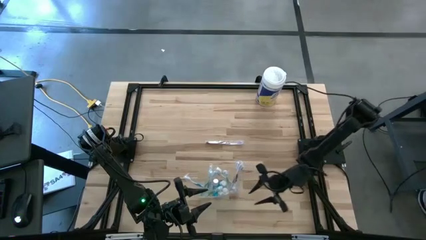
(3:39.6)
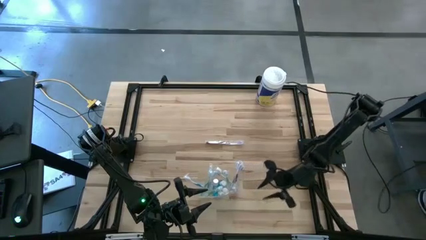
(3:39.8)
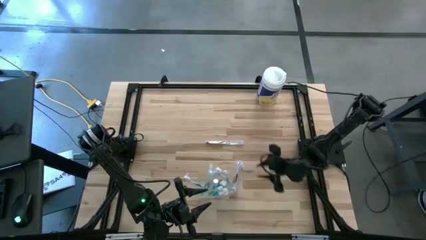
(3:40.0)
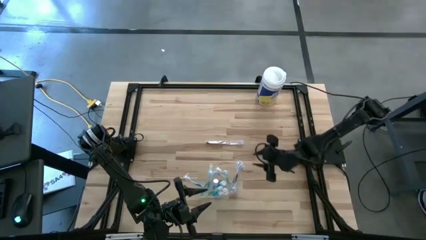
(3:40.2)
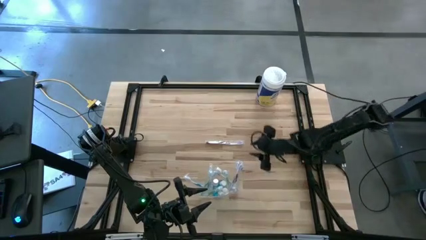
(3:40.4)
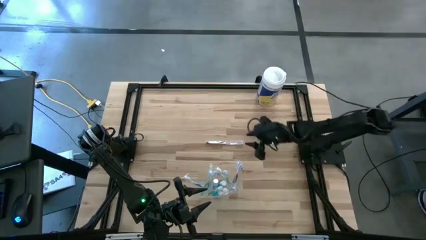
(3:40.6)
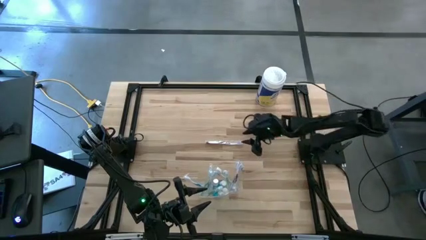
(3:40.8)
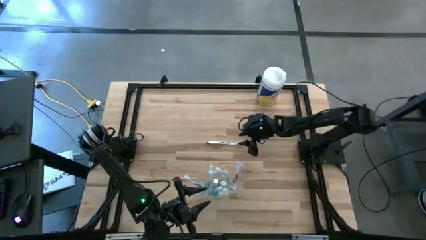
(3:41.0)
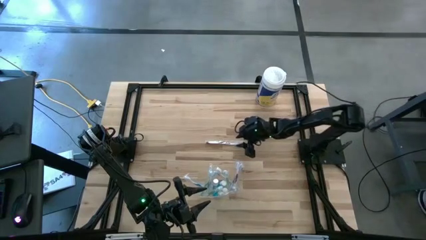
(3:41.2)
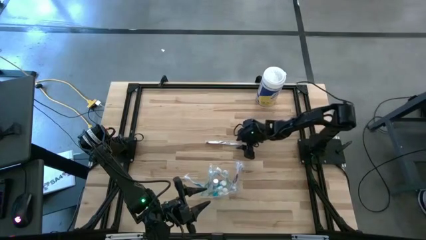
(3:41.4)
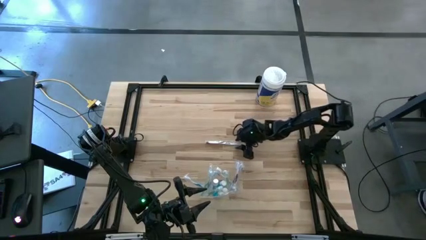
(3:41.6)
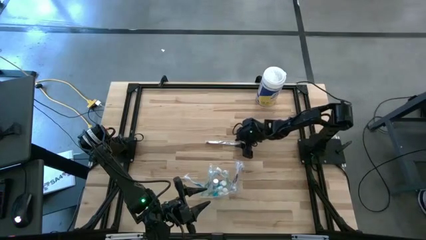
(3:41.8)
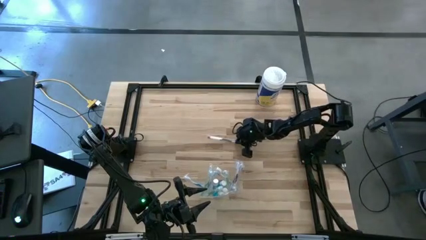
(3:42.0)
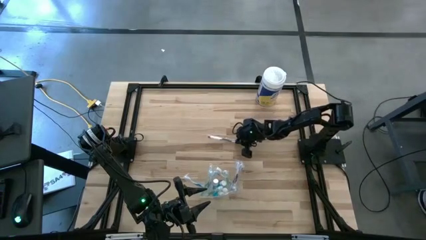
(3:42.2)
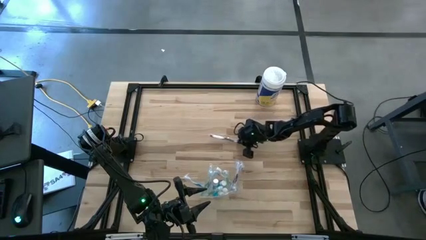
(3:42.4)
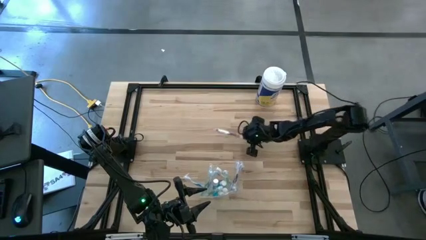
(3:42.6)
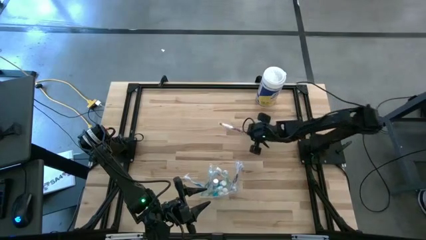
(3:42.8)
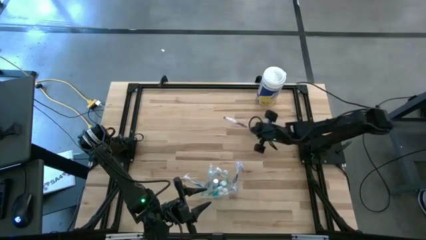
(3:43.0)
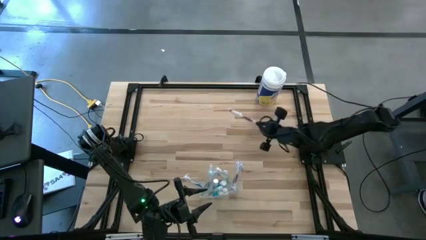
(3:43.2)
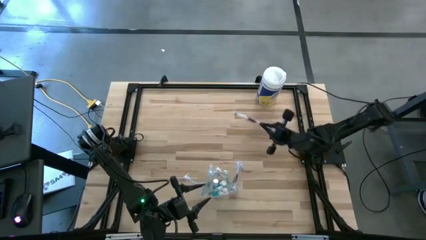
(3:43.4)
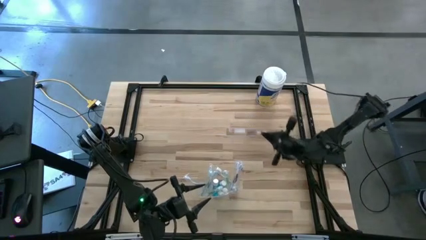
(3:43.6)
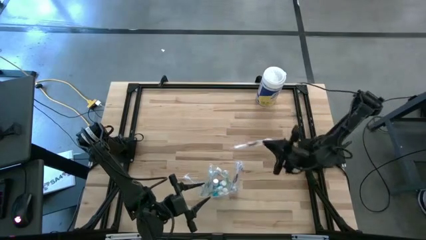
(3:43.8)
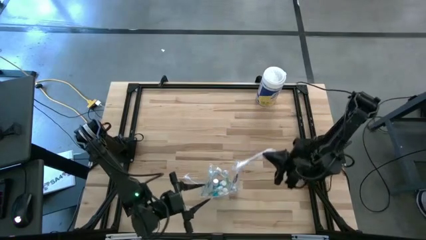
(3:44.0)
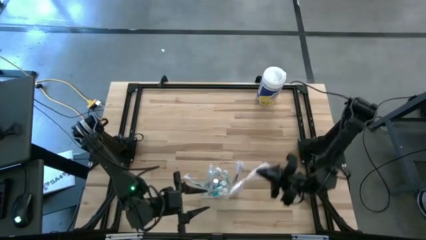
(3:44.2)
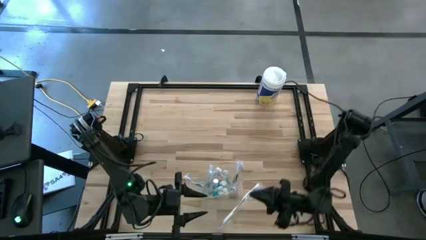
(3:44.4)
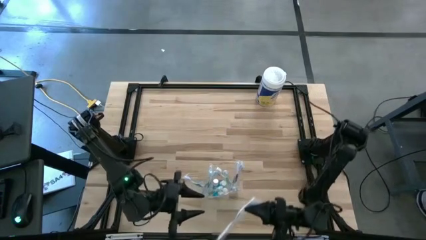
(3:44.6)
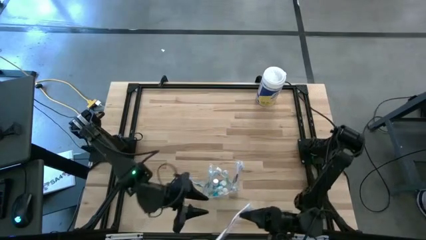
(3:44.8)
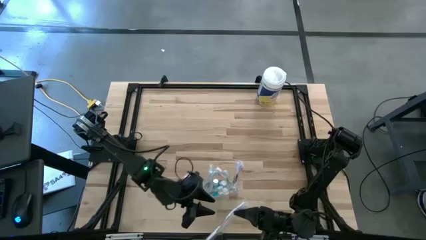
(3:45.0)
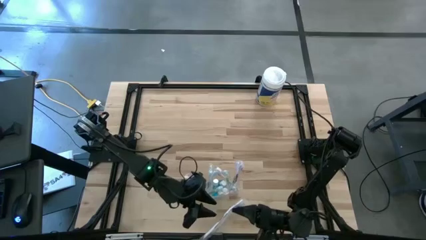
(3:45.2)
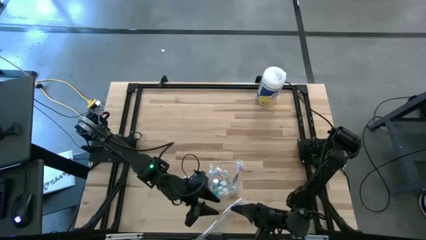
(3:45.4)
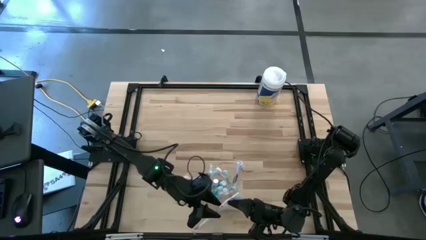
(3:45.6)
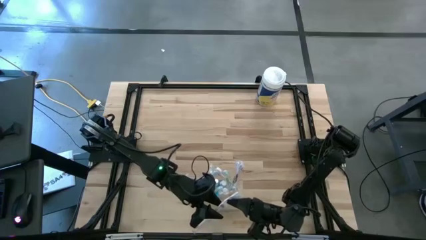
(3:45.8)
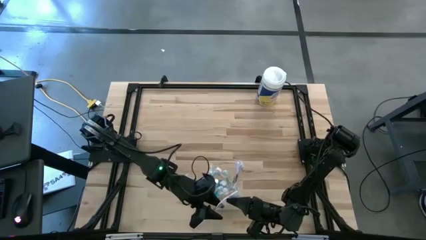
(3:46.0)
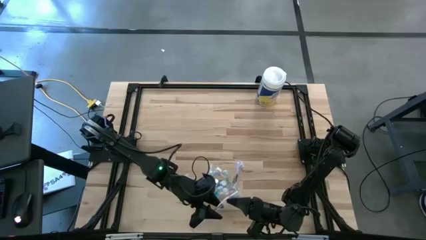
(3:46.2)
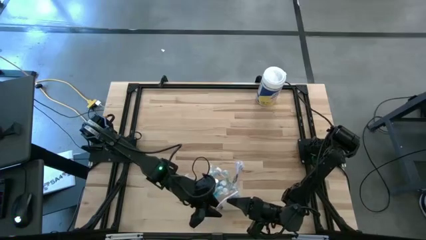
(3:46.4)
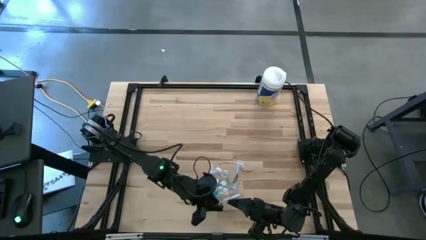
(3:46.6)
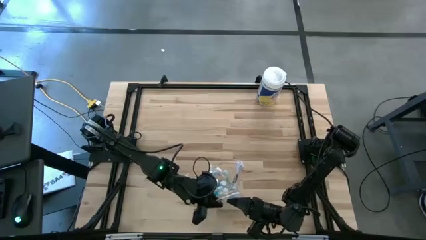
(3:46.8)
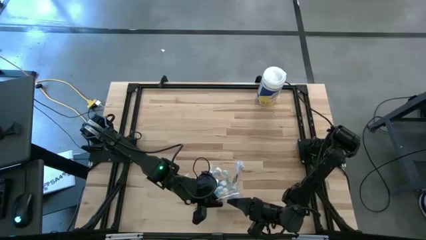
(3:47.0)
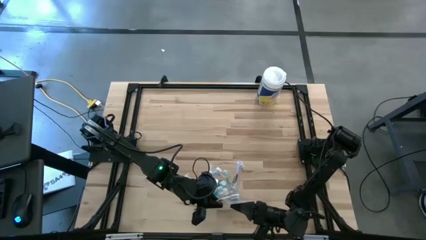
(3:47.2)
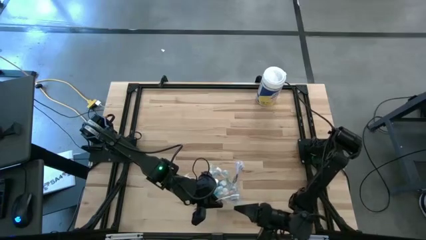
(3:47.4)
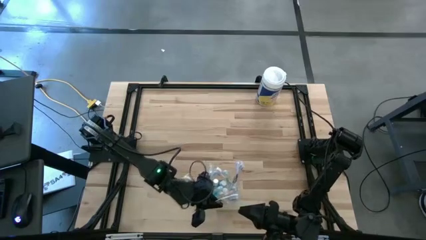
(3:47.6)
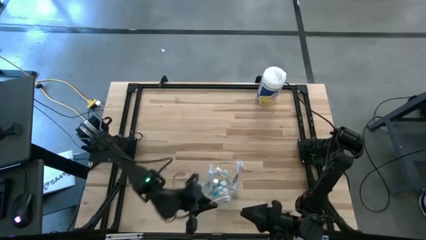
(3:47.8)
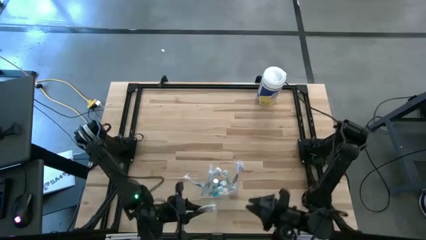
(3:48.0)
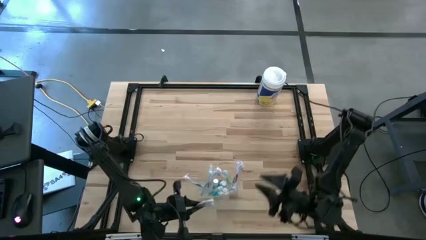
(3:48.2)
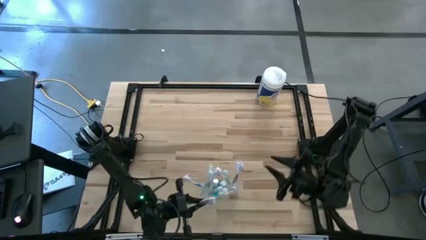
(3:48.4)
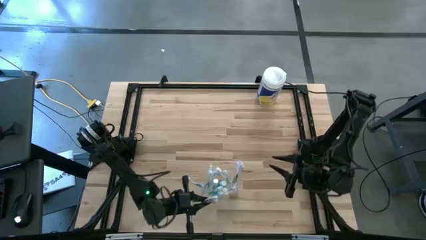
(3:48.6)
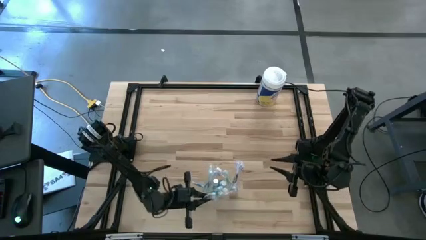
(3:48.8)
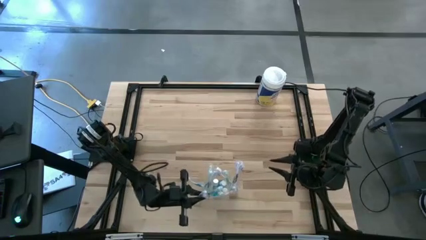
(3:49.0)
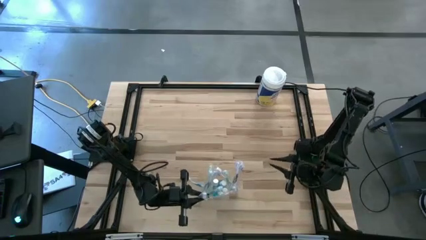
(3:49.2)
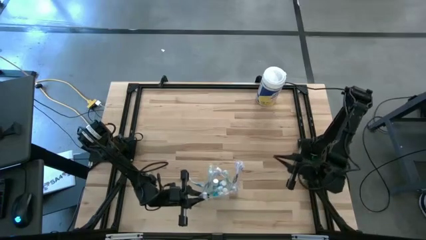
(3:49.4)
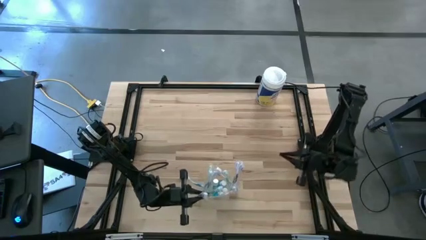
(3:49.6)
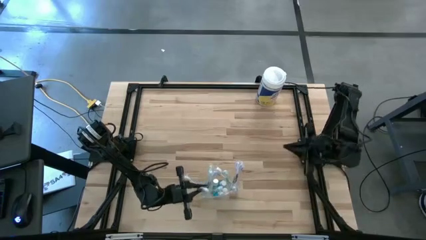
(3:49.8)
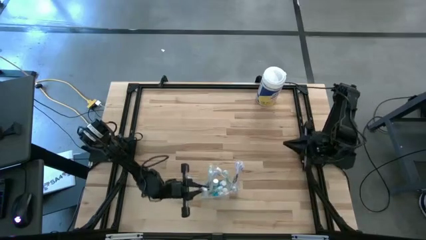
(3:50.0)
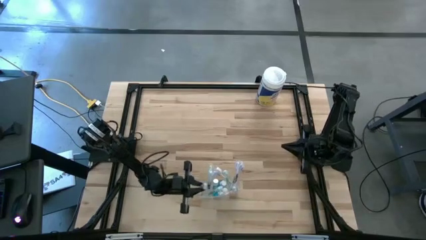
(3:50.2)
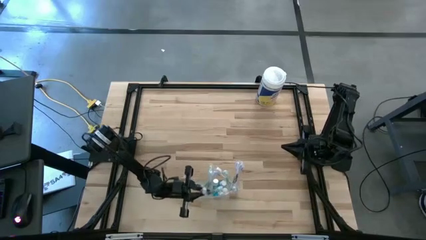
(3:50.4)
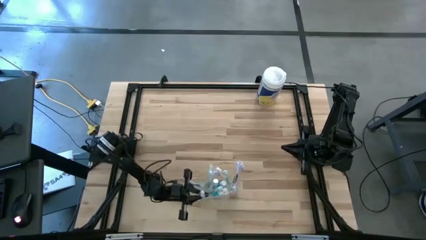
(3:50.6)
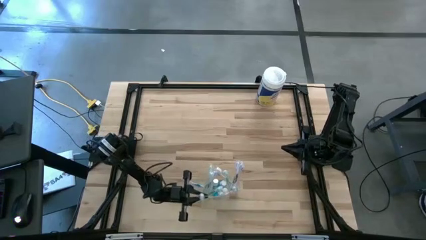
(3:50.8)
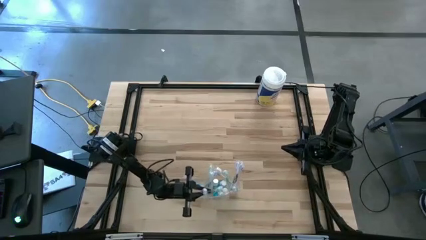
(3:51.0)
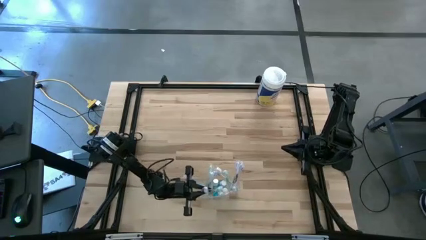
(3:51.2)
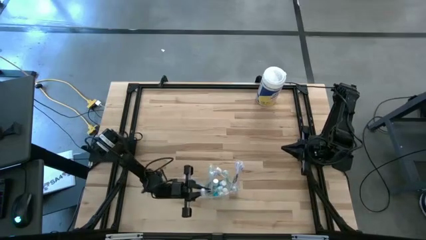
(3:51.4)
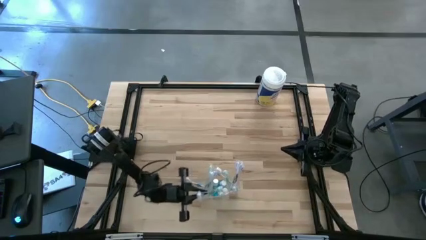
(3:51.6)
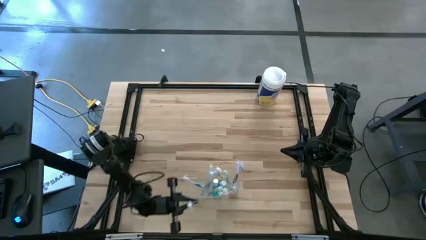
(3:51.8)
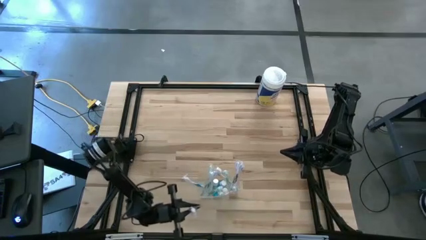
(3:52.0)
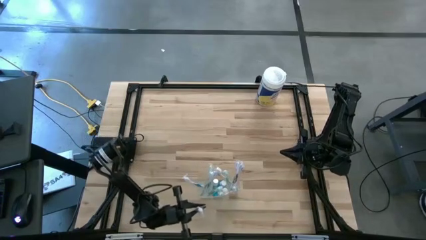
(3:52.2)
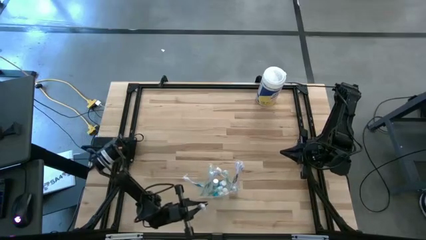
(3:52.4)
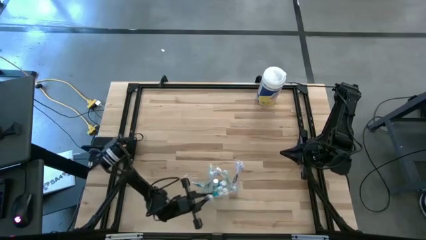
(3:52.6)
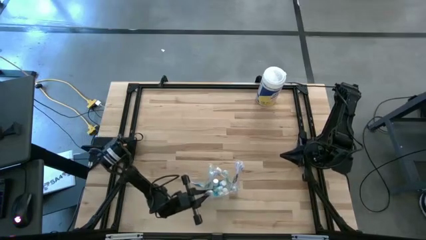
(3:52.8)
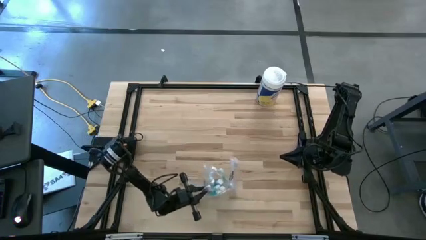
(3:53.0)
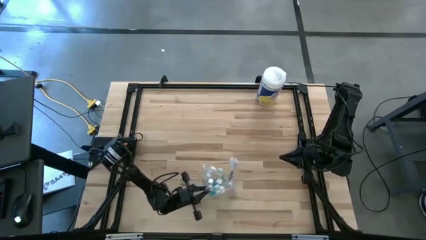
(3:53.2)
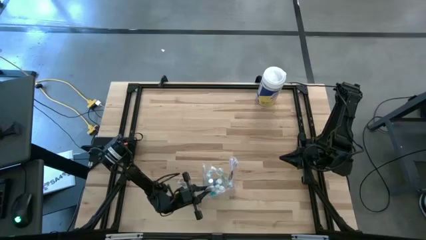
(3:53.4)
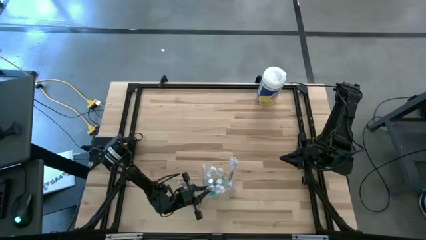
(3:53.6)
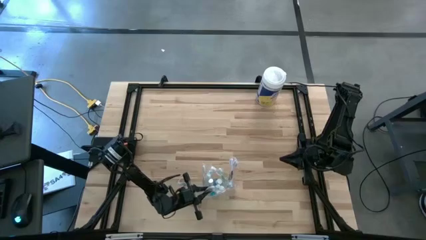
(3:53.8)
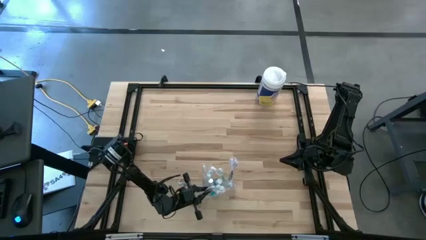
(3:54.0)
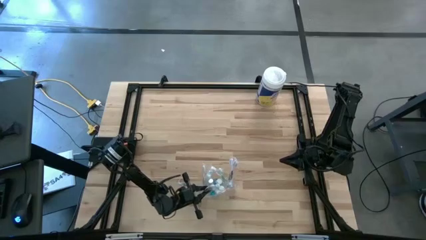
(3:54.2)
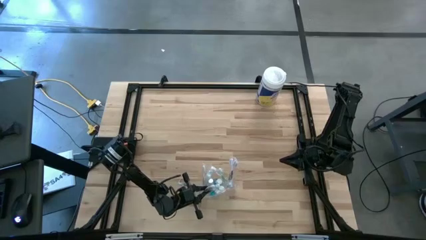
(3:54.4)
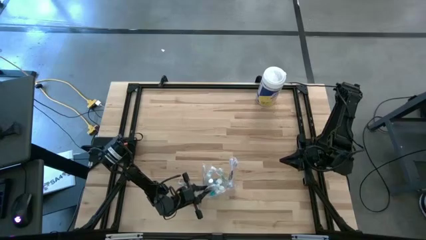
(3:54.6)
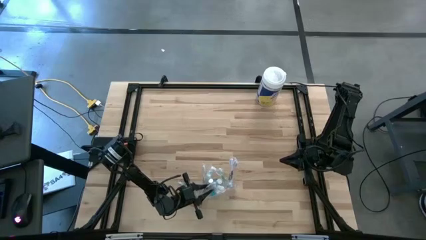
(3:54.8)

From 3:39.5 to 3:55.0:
Task: Pick & Place toothbrushing station
Put the purple toothbrush into the transparent organizer

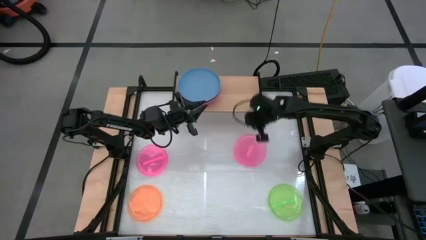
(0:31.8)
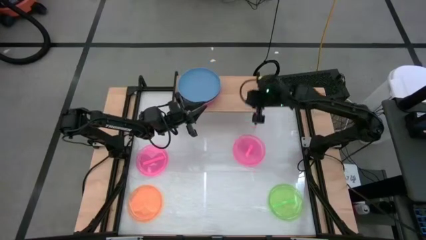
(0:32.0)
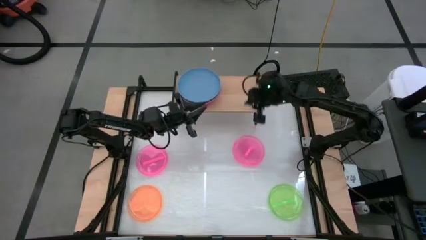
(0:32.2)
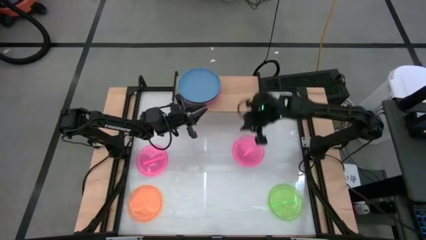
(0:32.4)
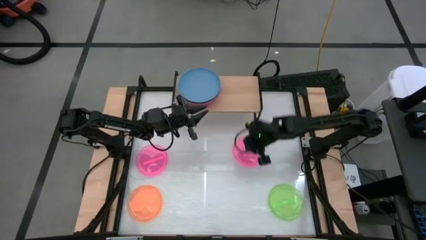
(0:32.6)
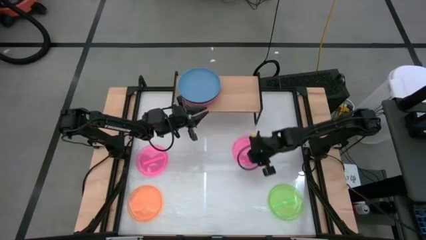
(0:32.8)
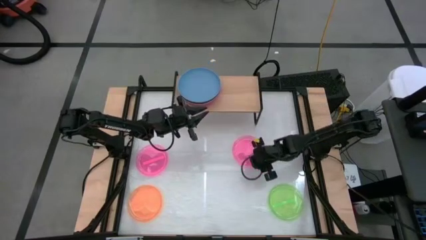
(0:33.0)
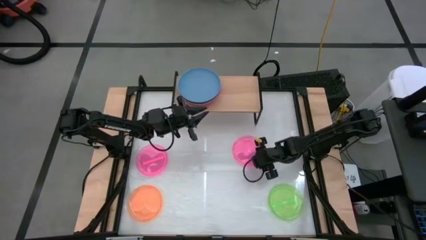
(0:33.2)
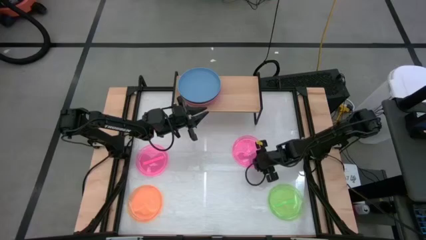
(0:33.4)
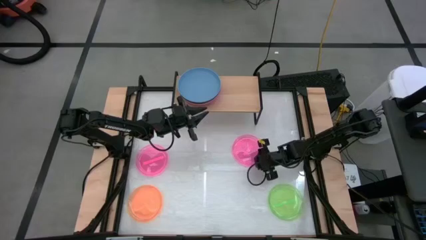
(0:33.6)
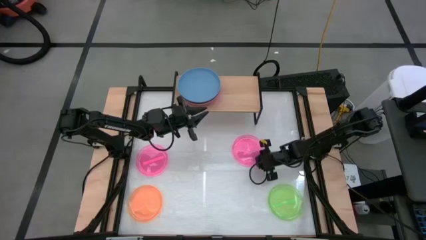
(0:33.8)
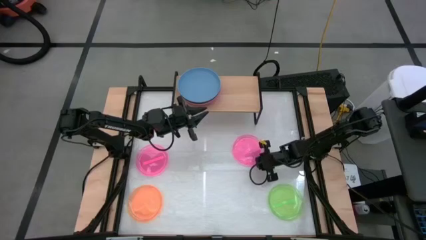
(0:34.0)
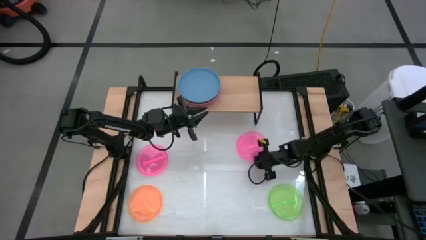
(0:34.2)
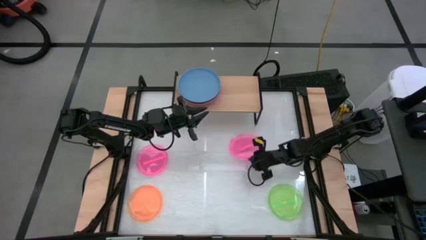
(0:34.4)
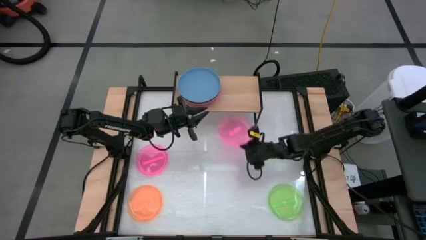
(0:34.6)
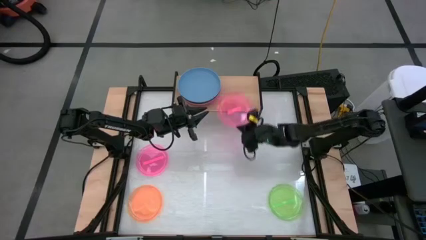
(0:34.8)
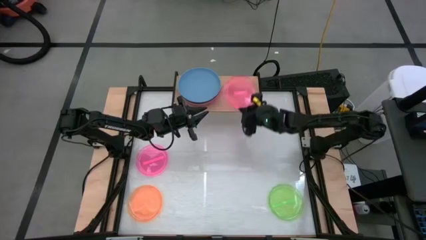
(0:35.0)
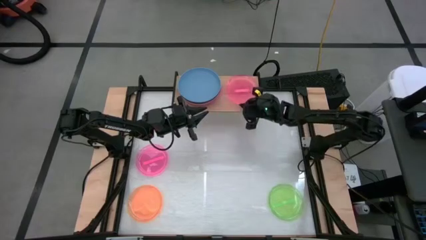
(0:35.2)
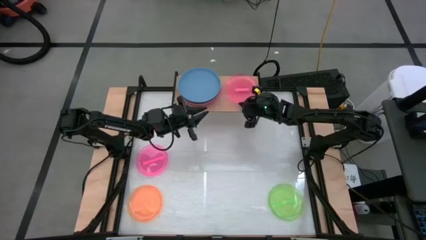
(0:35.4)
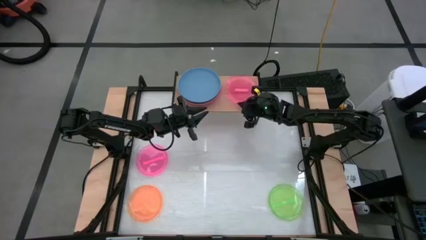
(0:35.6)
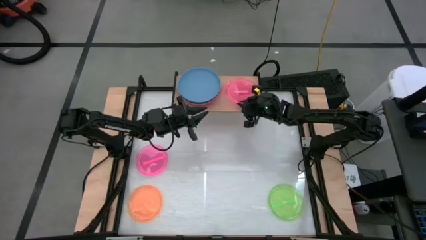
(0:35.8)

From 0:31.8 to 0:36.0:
Task: Place and stack plates onto a shelf
Put the right pink plate on the shelf
